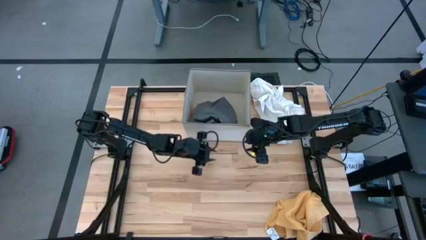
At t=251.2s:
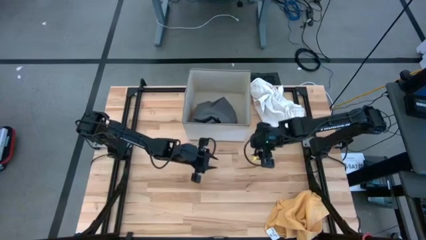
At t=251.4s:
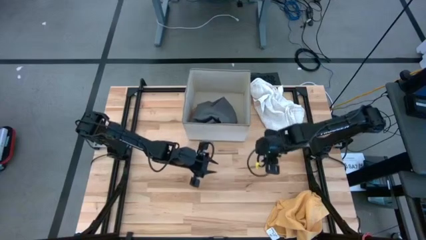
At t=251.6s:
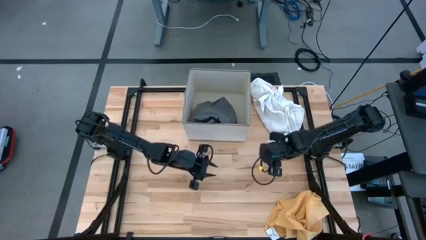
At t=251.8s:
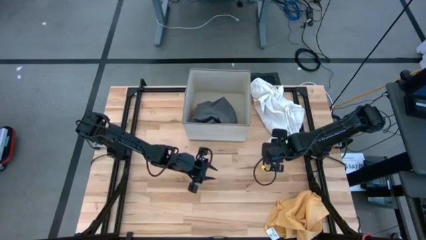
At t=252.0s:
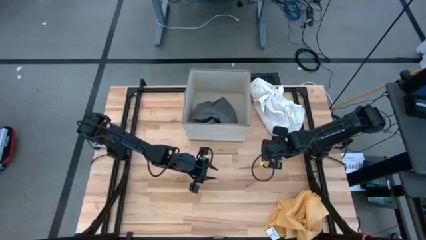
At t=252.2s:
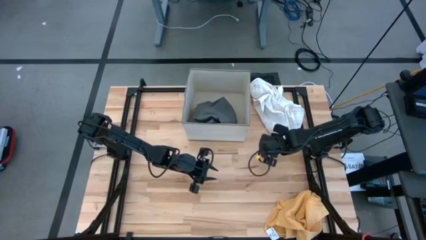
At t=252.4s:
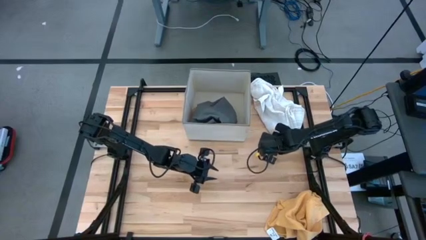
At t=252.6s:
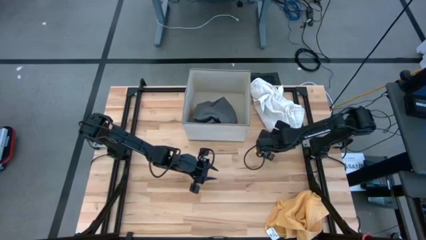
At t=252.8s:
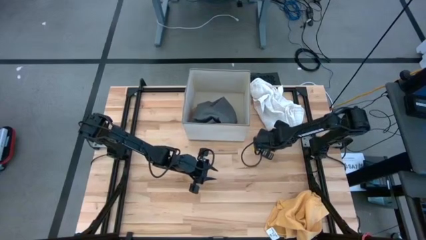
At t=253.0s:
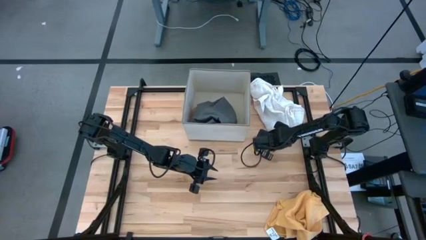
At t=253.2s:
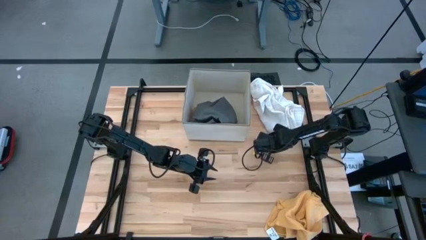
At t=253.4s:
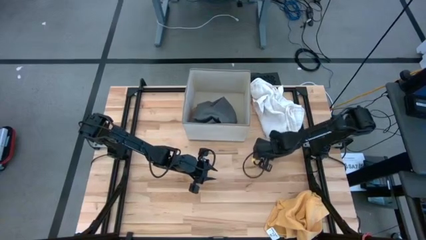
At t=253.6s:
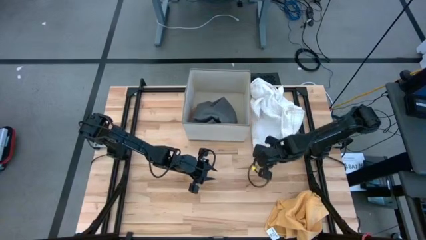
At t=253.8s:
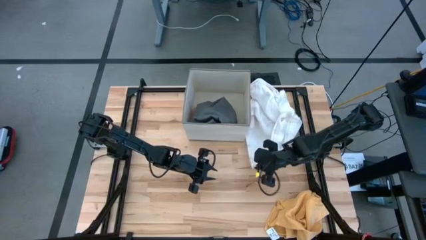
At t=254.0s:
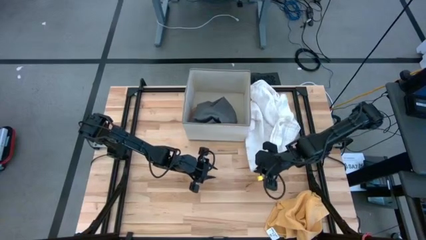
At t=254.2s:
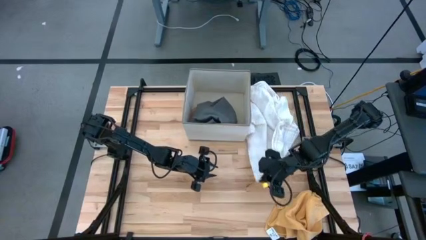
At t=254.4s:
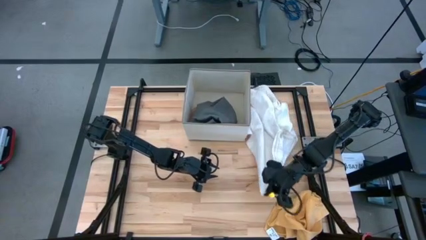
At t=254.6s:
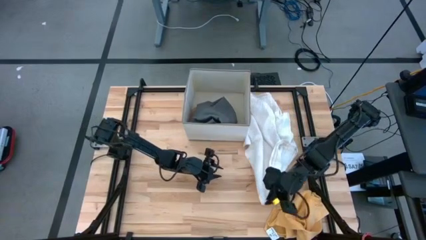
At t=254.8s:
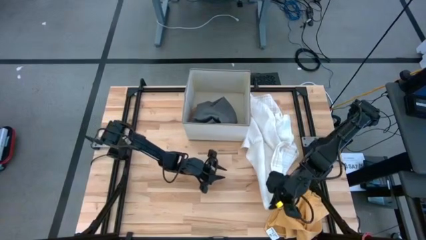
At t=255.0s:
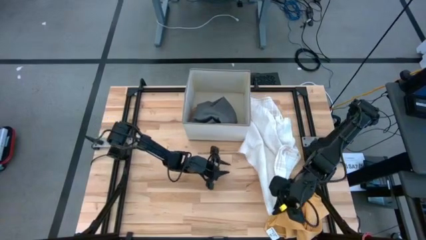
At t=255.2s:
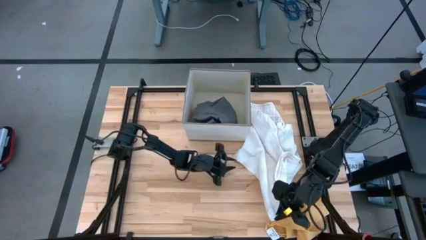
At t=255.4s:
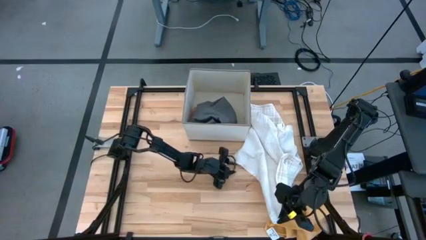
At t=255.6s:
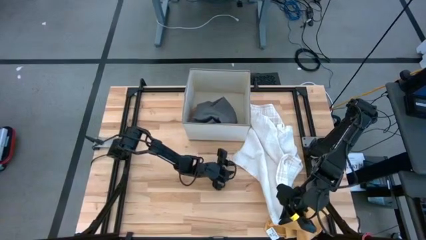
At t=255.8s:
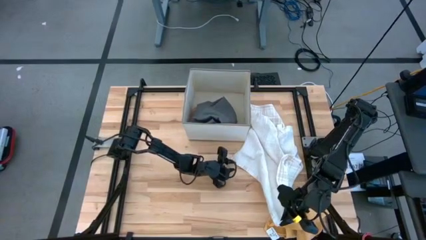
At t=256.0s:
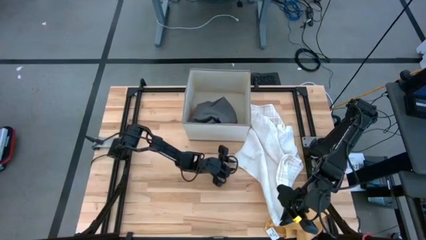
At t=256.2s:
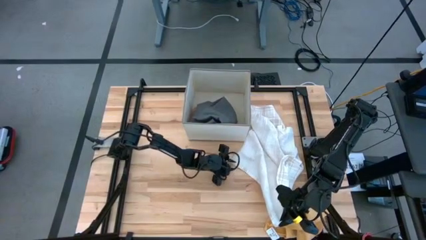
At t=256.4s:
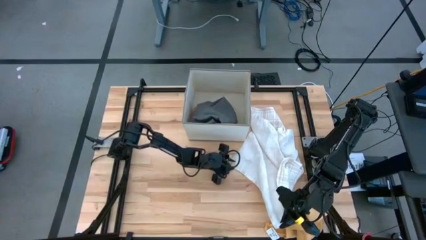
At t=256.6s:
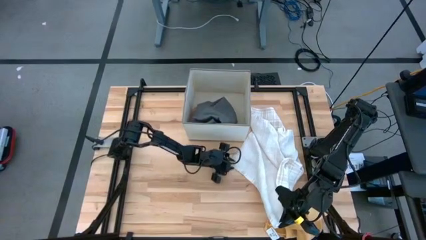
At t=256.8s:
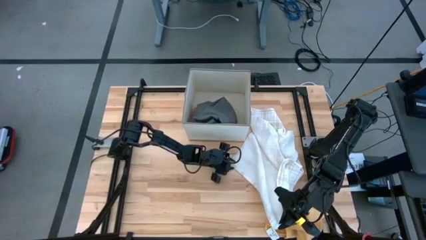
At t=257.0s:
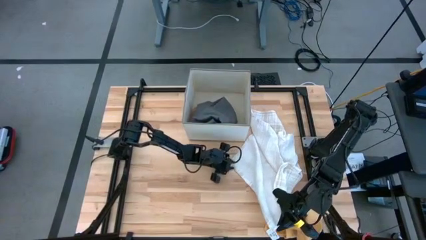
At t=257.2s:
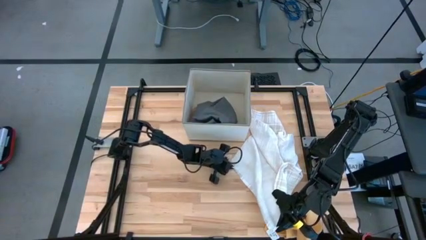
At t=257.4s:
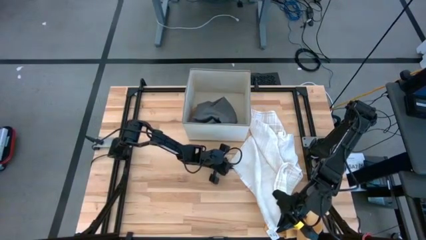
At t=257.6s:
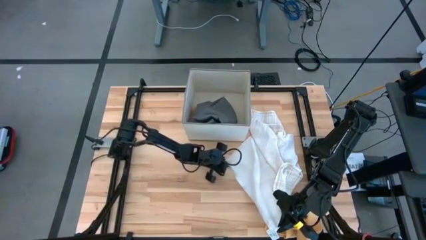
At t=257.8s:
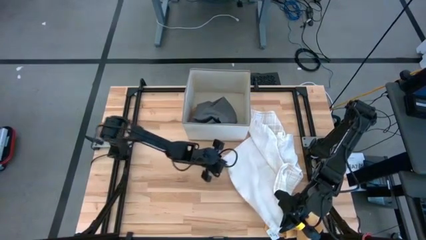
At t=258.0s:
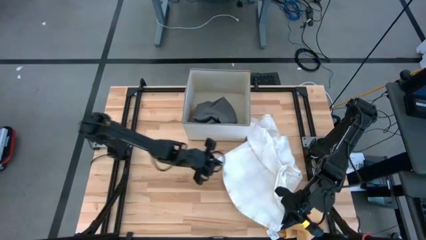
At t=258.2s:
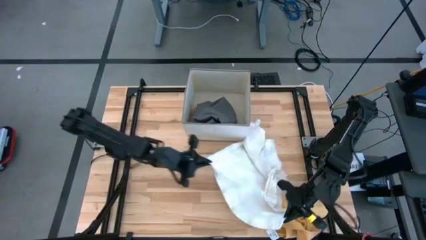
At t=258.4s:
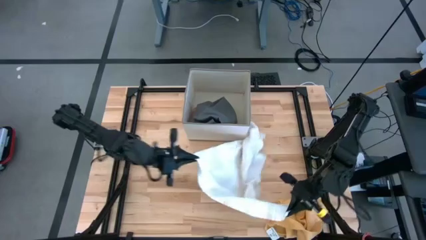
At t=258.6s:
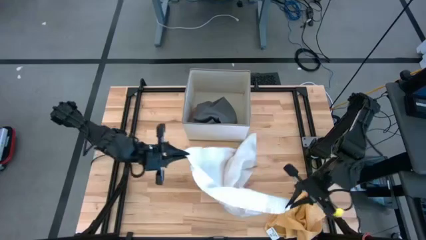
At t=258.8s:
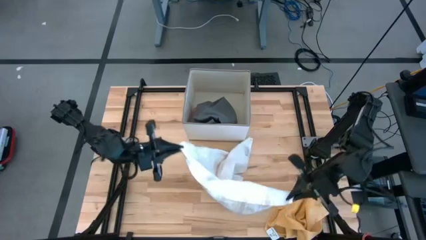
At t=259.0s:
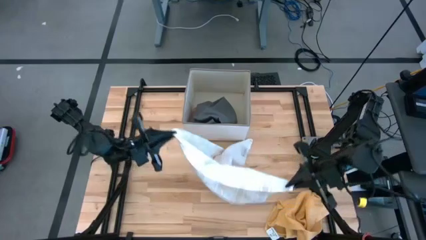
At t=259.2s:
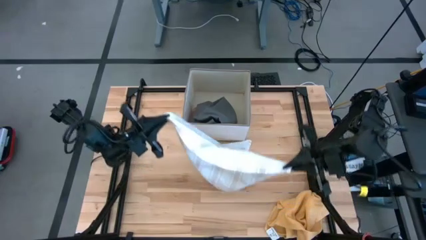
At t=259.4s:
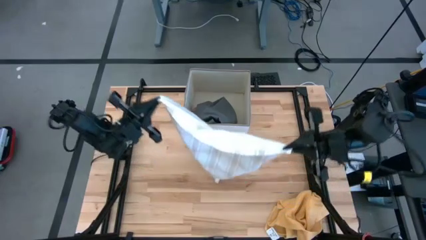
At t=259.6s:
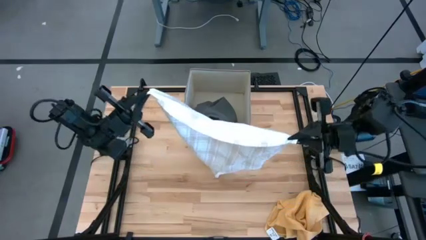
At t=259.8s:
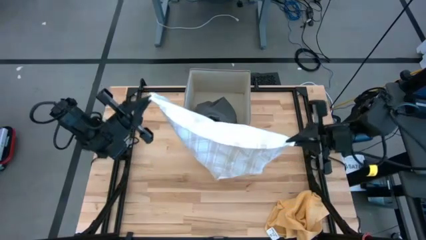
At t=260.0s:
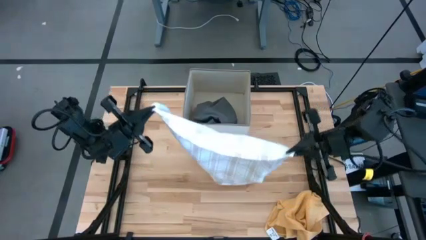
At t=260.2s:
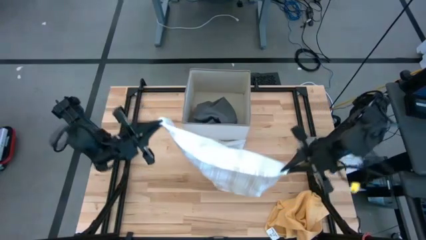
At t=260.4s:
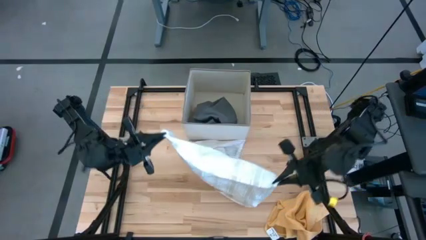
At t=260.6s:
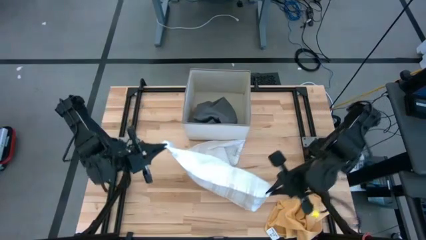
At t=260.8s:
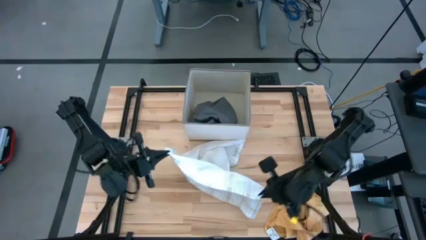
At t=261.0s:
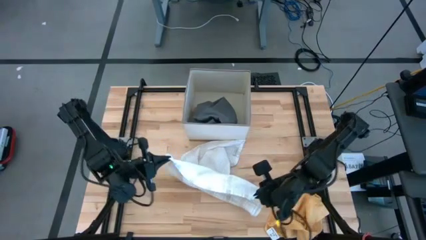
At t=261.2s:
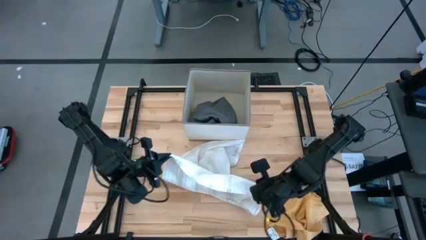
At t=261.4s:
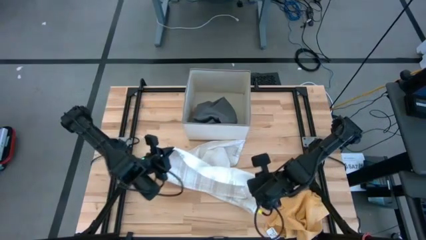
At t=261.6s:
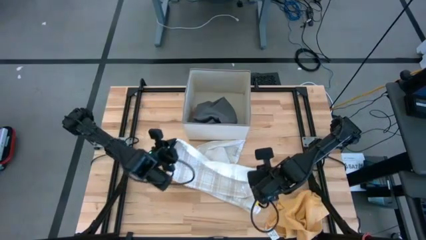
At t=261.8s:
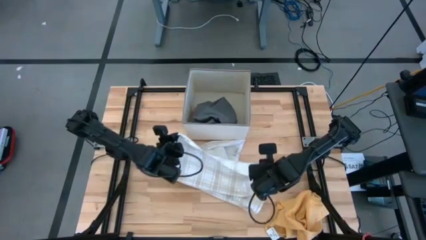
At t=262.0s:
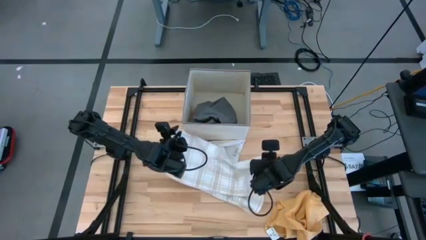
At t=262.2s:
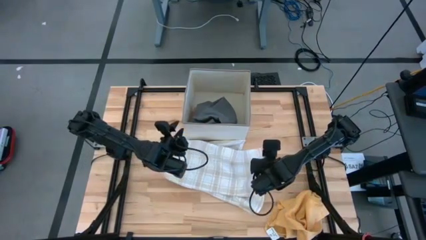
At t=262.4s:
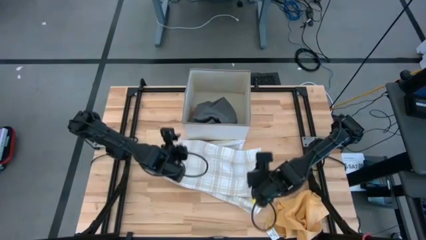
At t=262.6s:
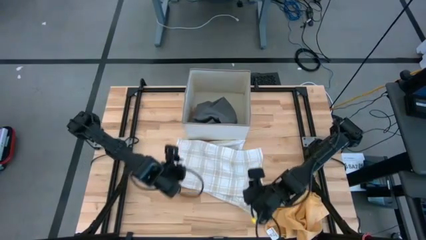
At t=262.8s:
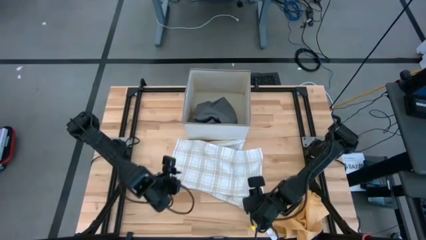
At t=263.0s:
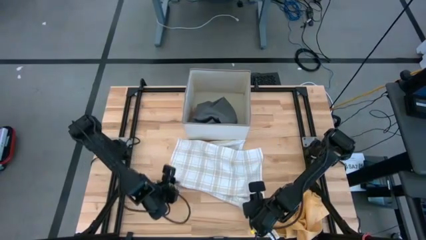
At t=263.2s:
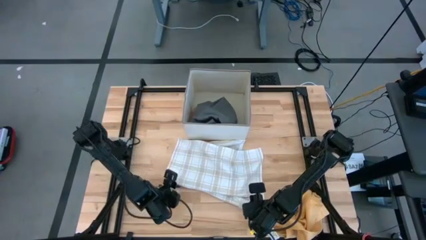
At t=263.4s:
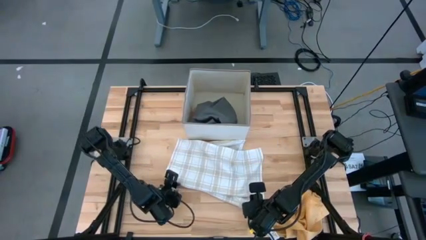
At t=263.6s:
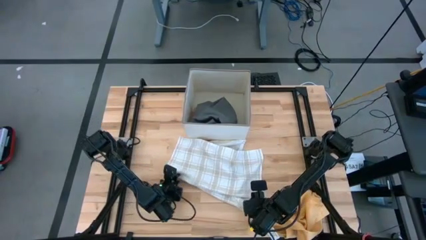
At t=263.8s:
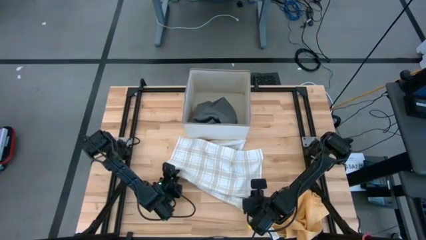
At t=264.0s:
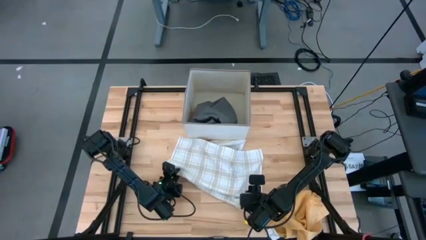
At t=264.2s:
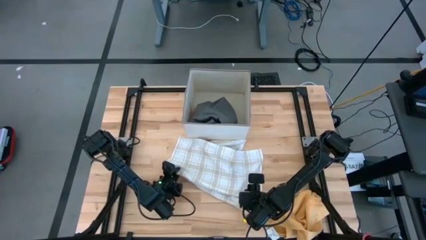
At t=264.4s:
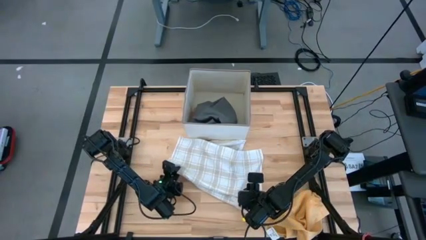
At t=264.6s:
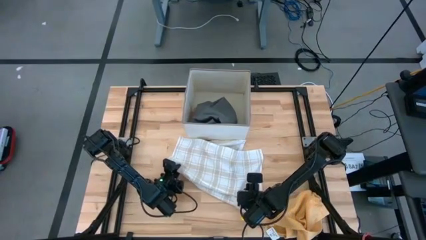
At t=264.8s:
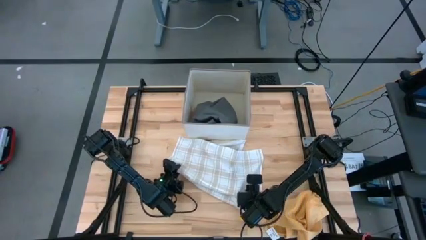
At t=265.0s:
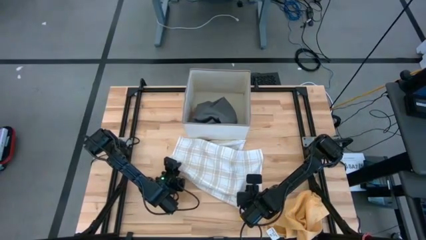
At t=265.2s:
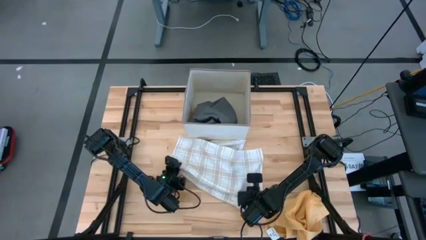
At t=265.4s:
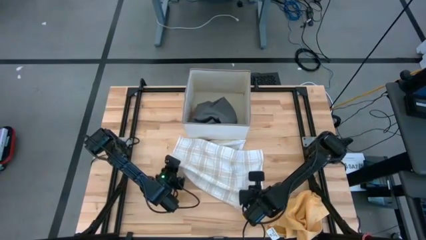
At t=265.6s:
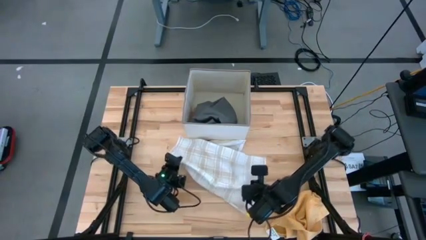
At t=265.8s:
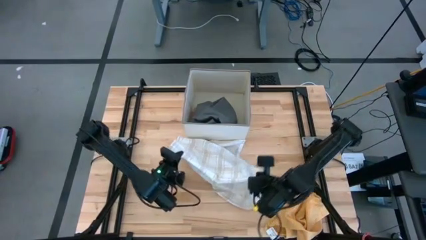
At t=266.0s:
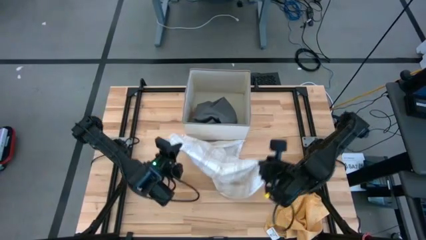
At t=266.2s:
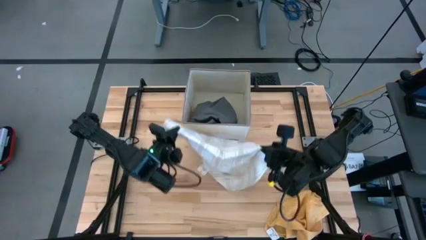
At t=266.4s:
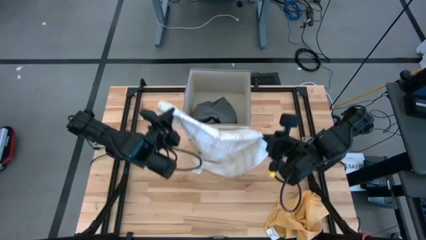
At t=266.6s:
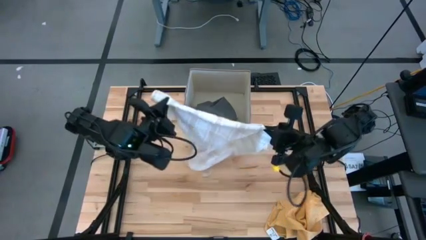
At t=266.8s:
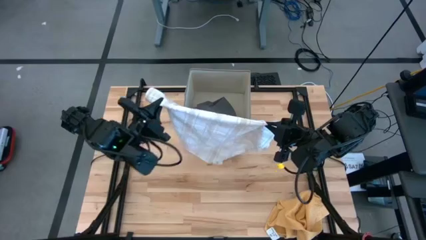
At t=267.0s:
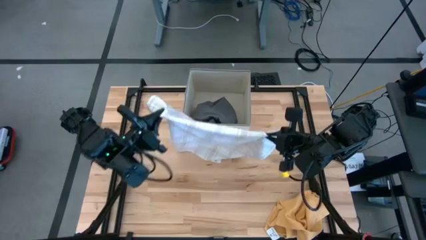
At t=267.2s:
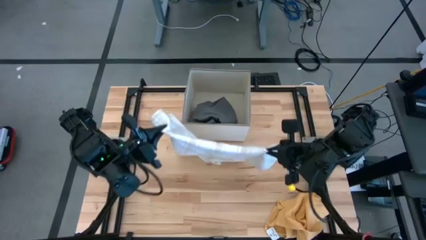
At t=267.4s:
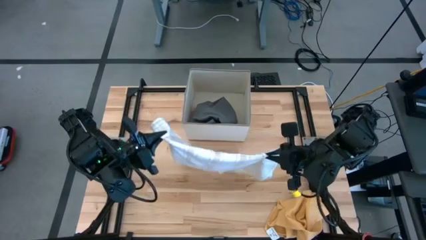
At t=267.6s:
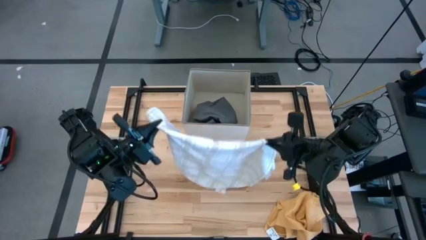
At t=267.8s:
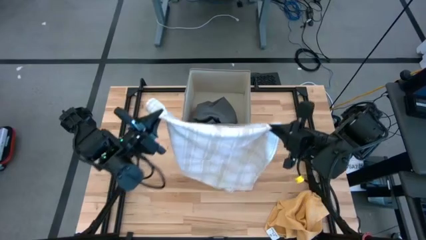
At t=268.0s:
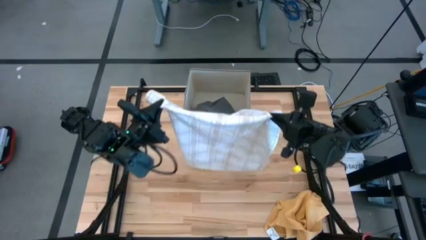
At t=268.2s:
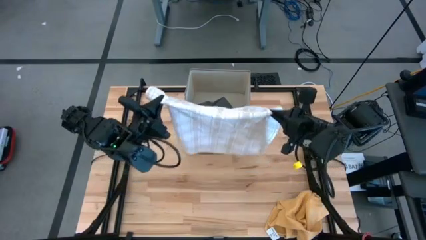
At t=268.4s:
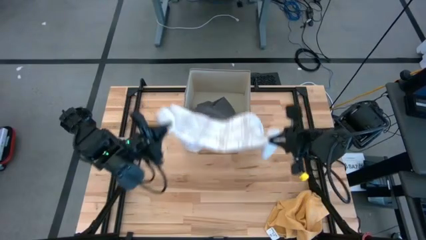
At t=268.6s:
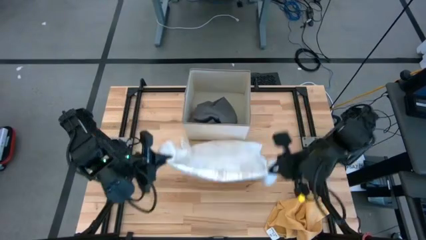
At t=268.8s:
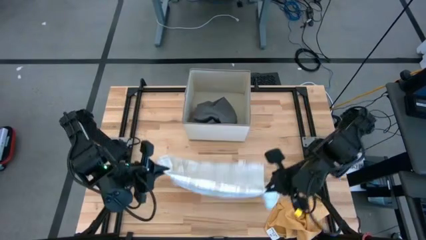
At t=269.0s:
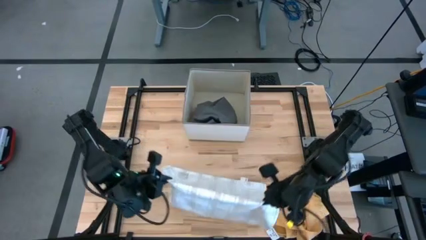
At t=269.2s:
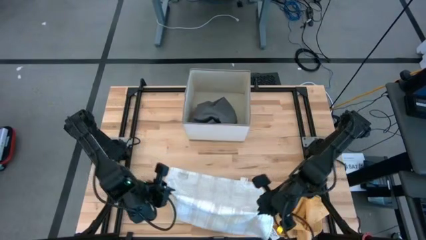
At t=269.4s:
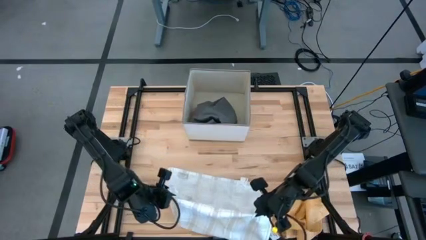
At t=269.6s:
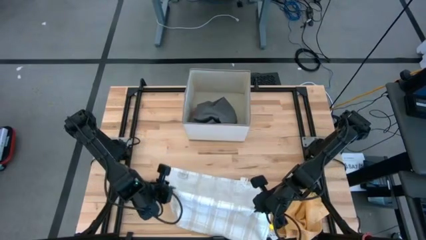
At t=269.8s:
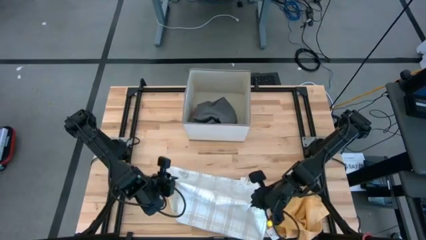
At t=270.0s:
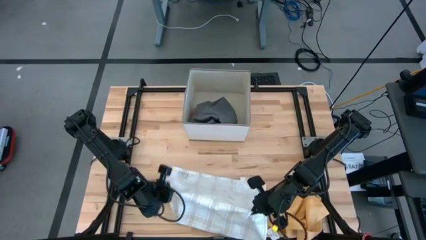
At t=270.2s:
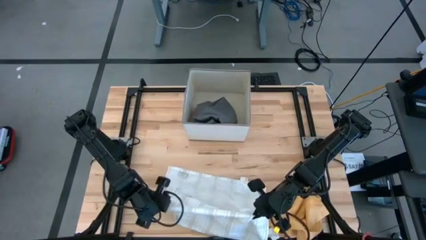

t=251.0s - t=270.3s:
Task: Fold towel
Fold the white patterned towel
